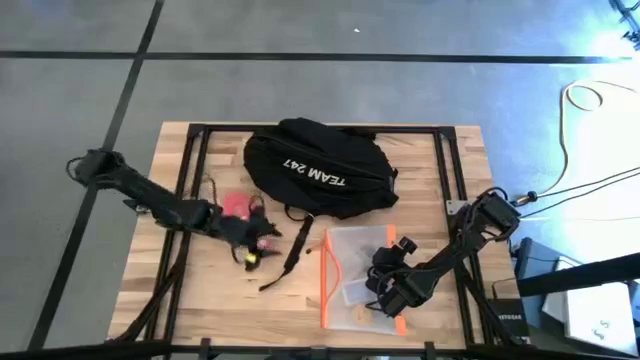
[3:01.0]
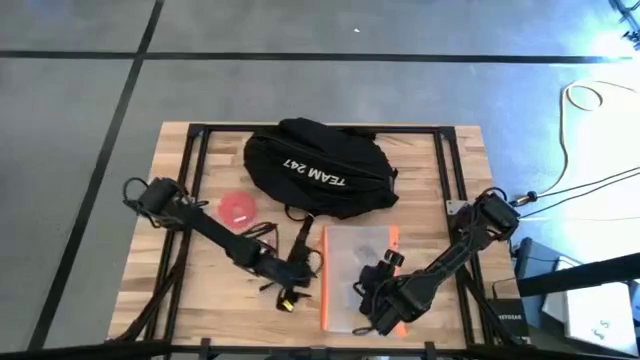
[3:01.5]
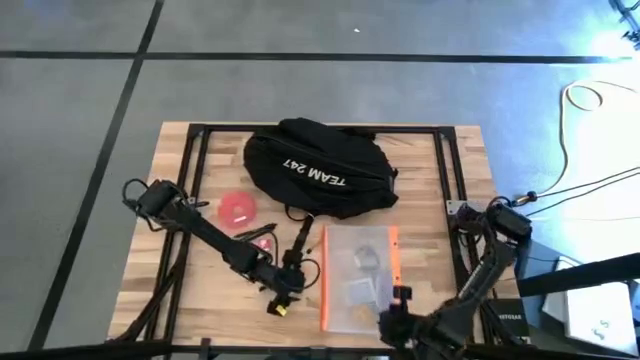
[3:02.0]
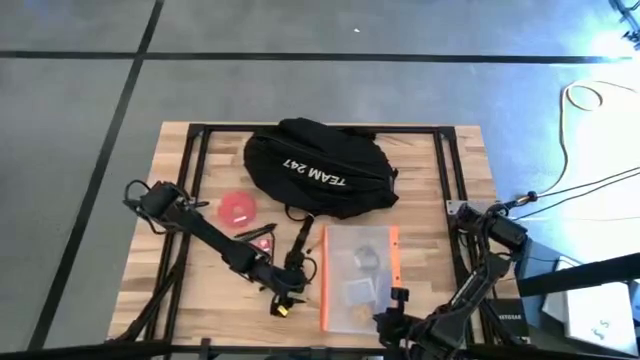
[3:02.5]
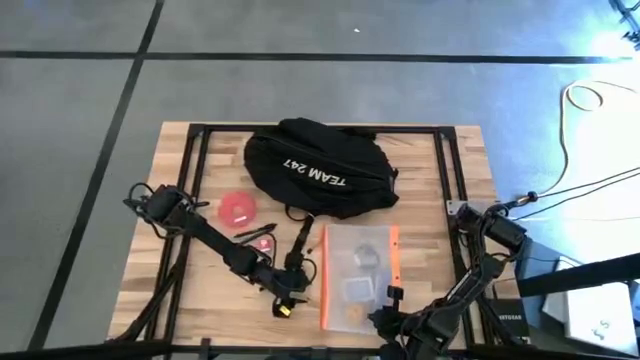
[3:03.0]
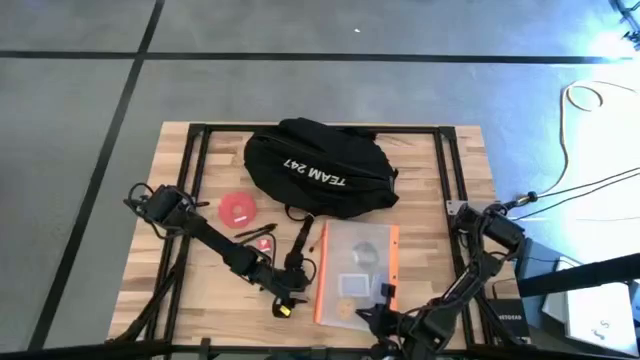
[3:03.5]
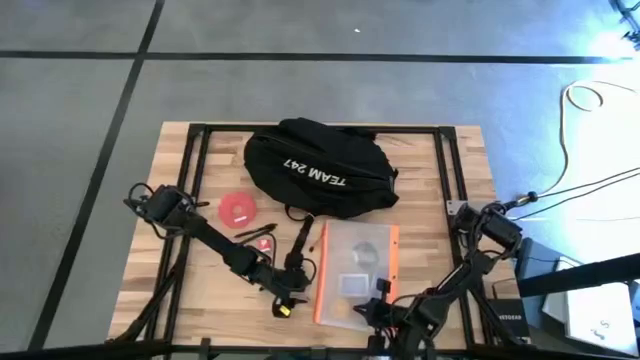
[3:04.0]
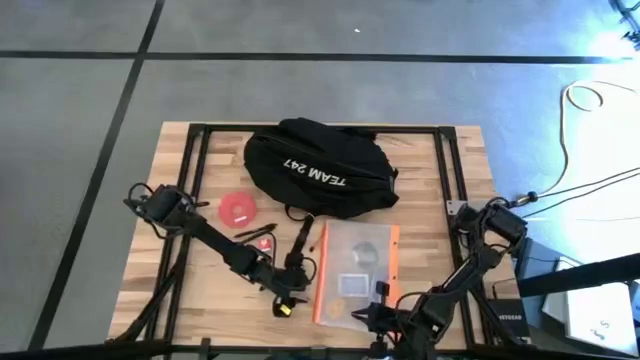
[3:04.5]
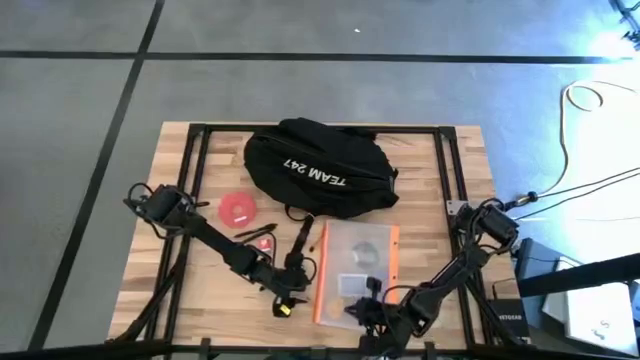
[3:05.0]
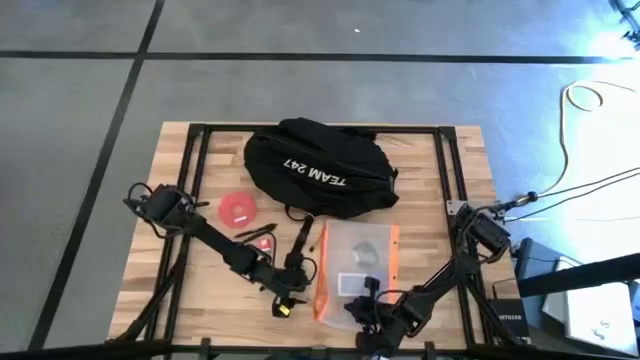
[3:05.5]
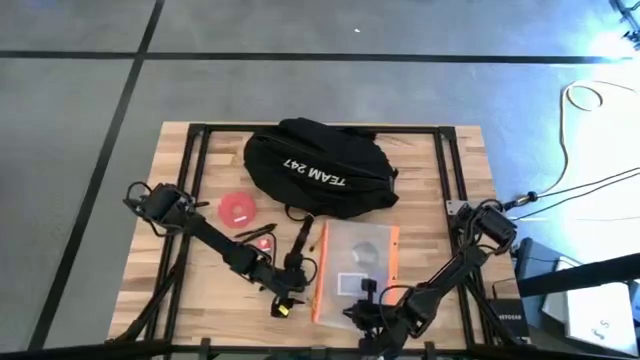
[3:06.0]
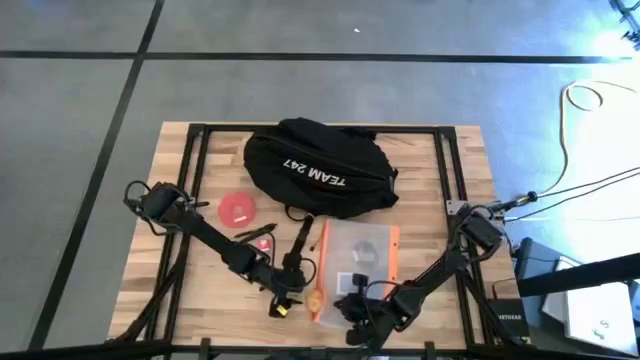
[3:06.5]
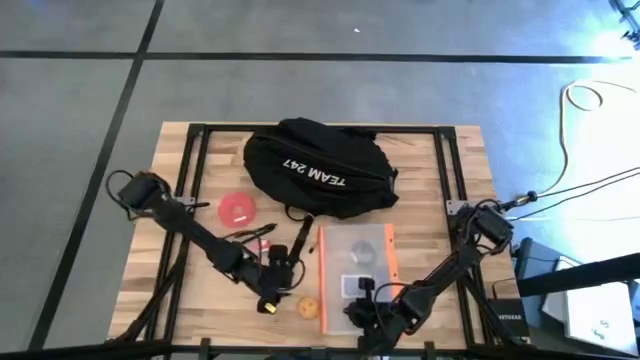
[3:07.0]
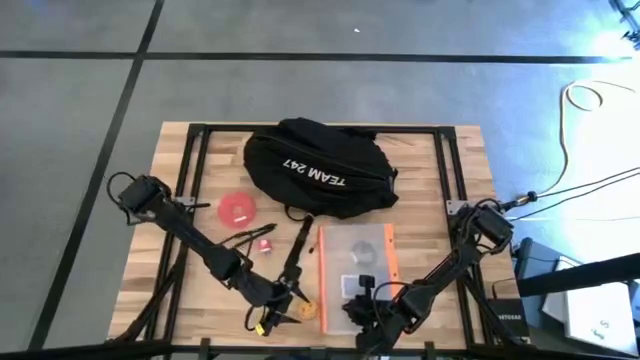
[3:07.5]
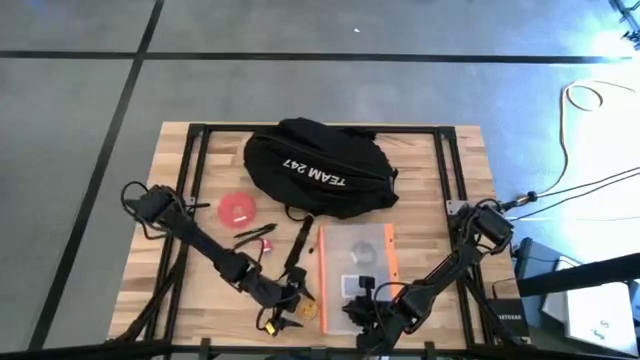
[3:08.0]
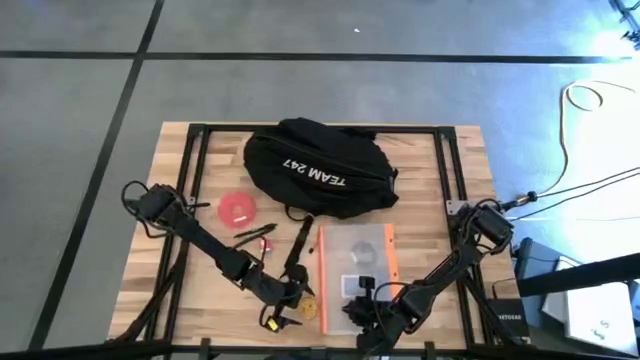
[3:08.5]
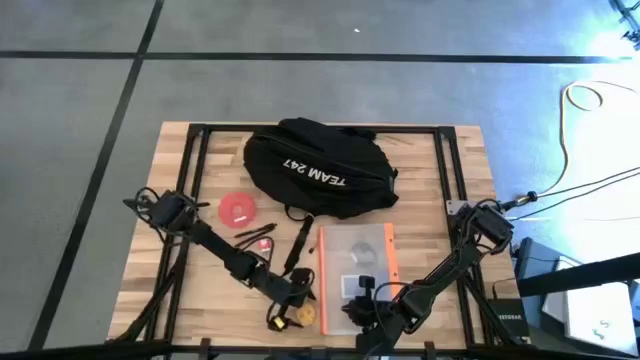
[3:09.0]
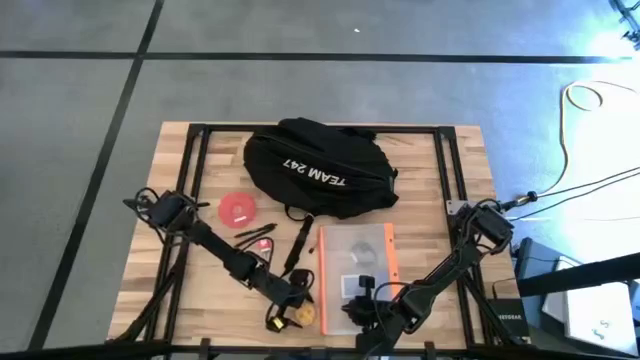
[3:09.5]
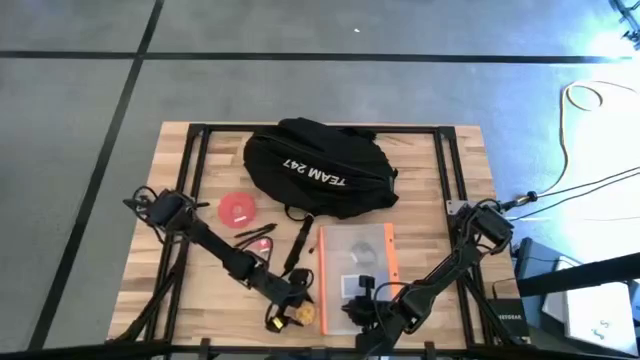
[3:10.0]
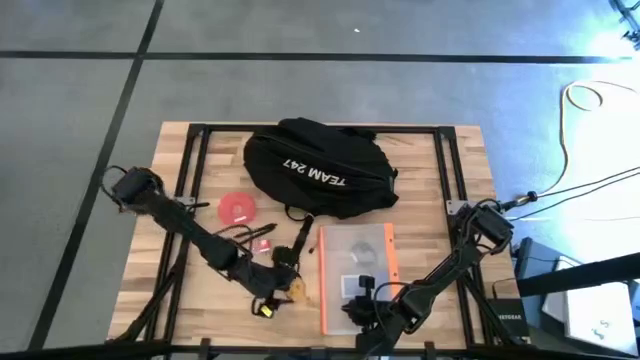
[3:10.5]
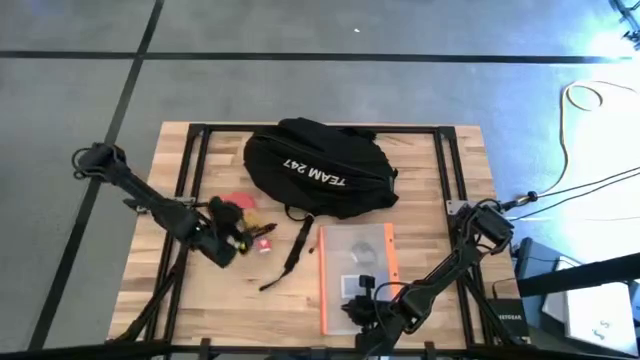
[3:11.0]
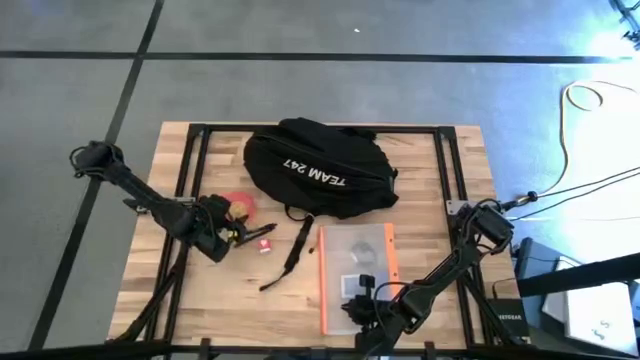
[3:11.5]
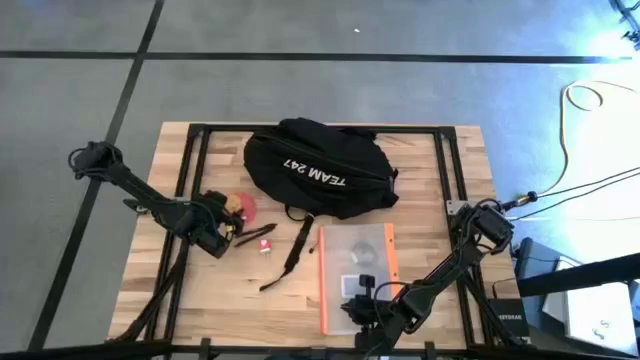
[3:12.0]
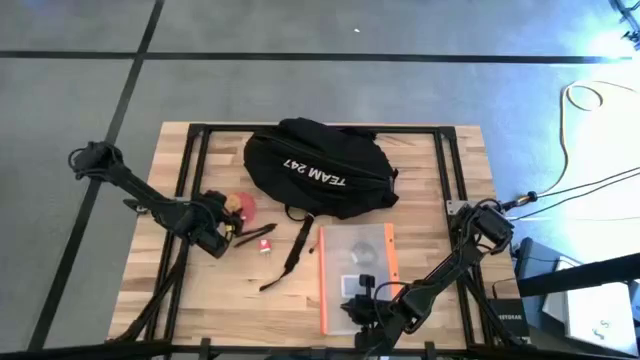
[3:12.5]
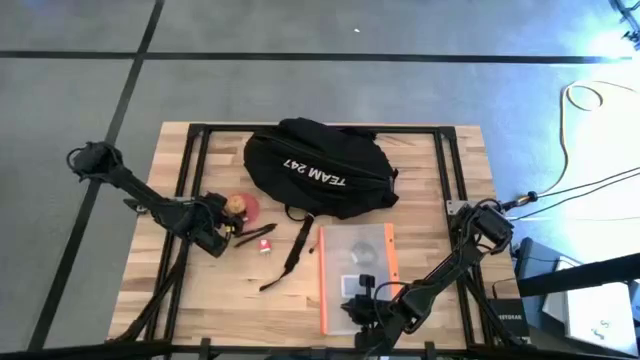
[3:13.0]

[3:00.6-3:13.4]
Task: Unpack backpack
Remove the yellow scented candle from the transparent white zip bag

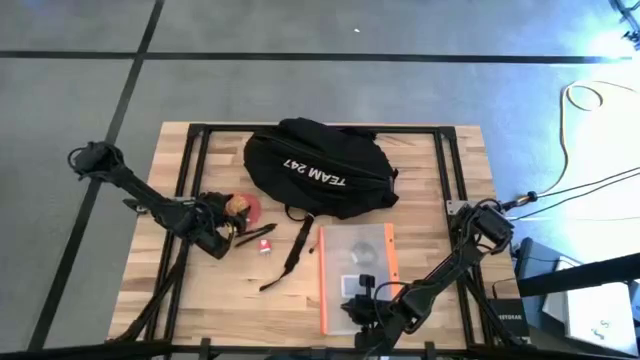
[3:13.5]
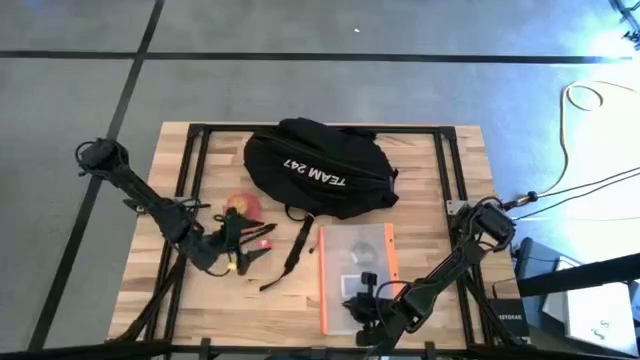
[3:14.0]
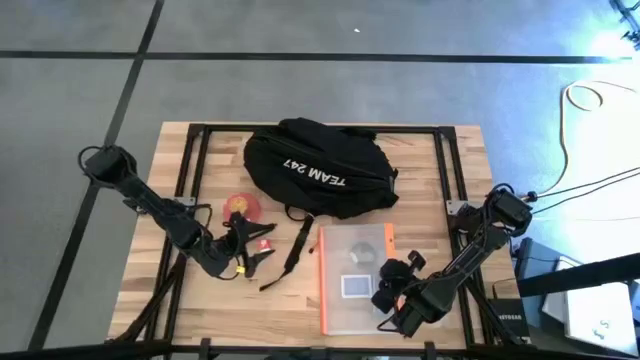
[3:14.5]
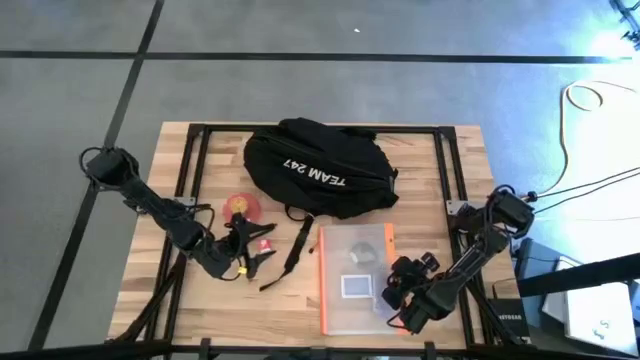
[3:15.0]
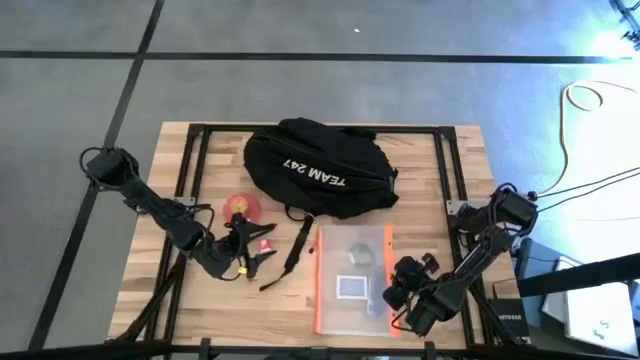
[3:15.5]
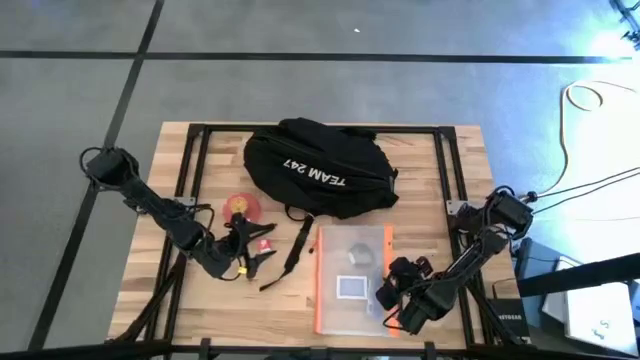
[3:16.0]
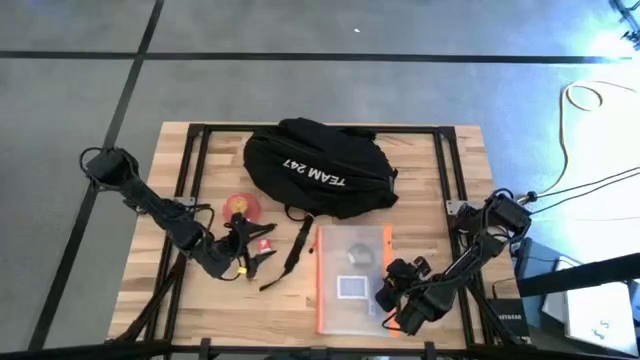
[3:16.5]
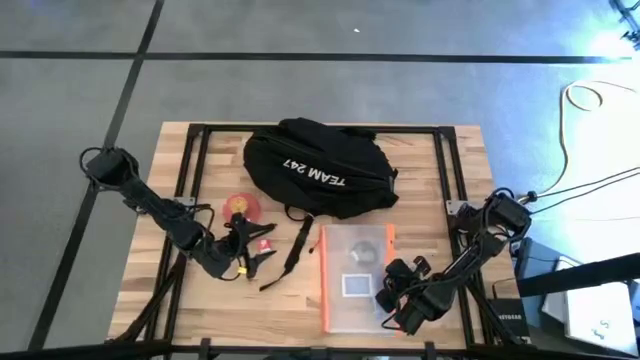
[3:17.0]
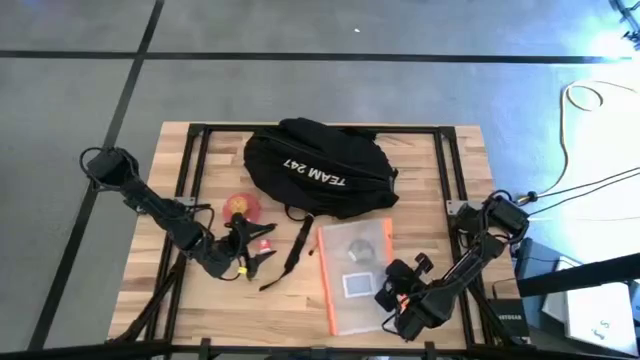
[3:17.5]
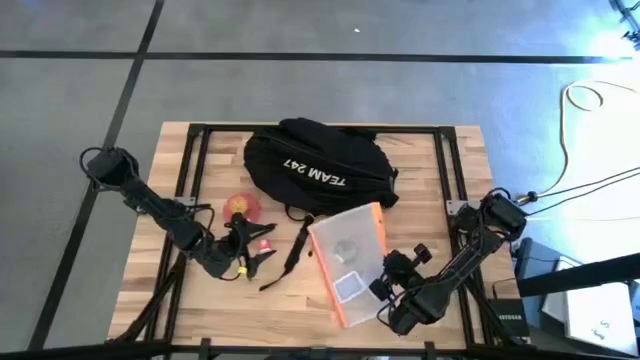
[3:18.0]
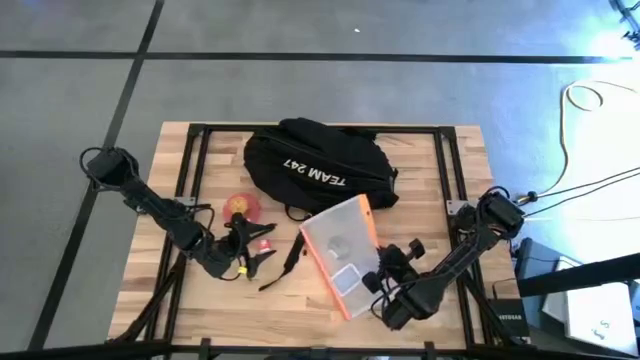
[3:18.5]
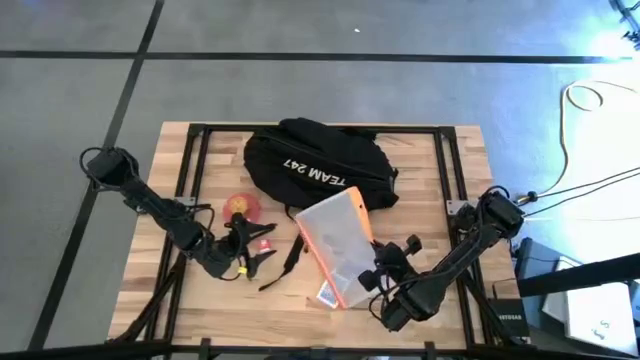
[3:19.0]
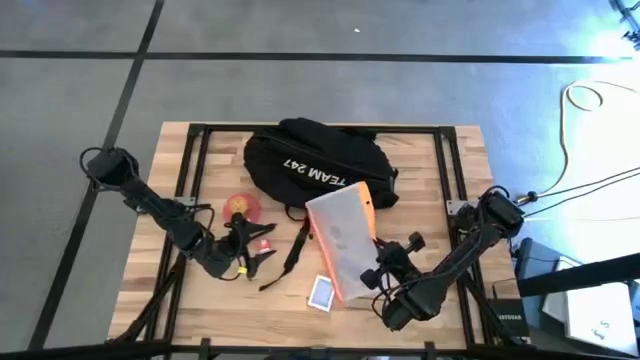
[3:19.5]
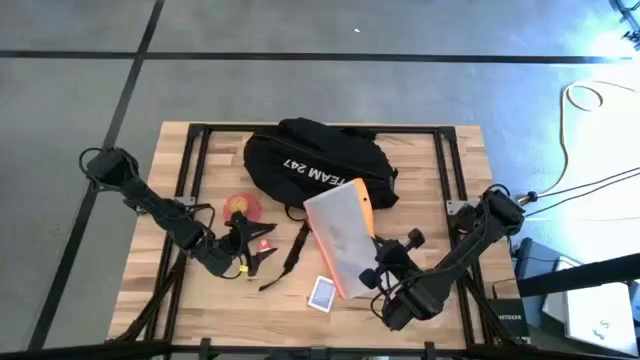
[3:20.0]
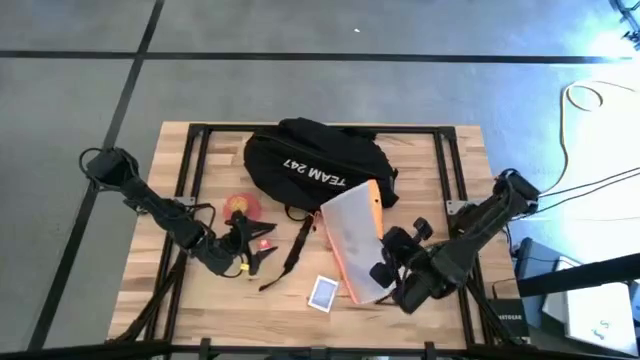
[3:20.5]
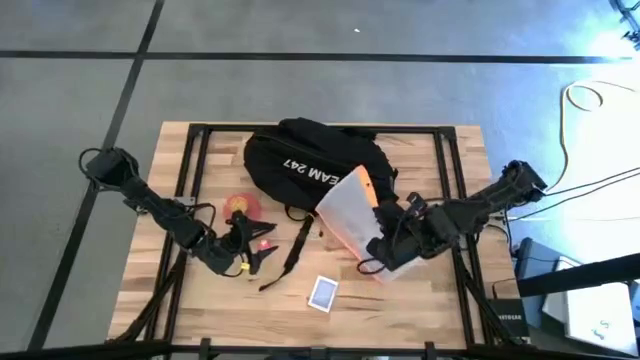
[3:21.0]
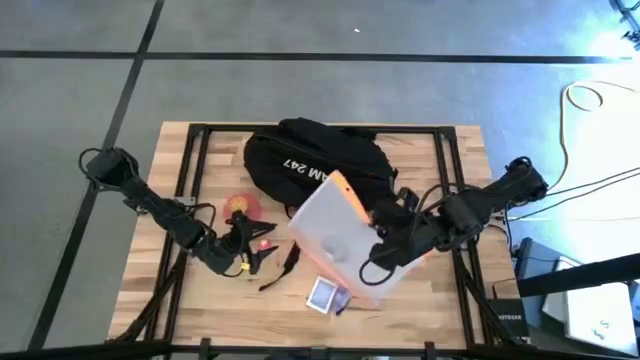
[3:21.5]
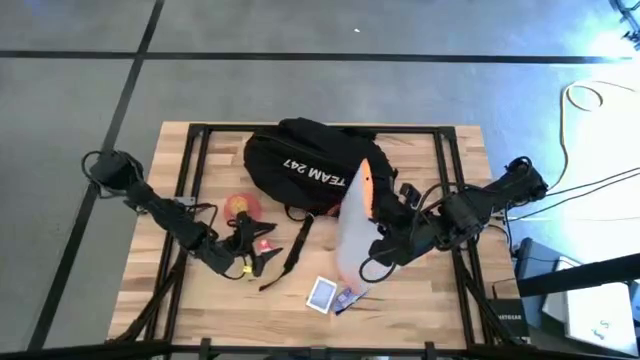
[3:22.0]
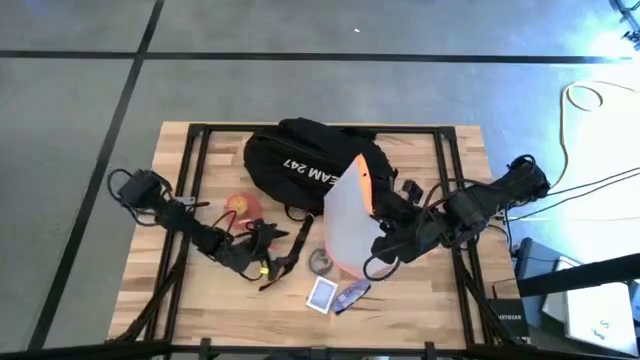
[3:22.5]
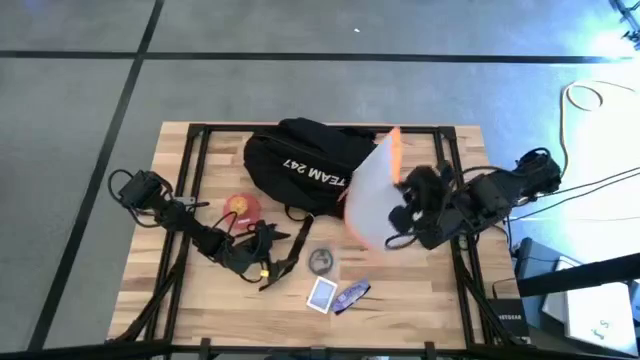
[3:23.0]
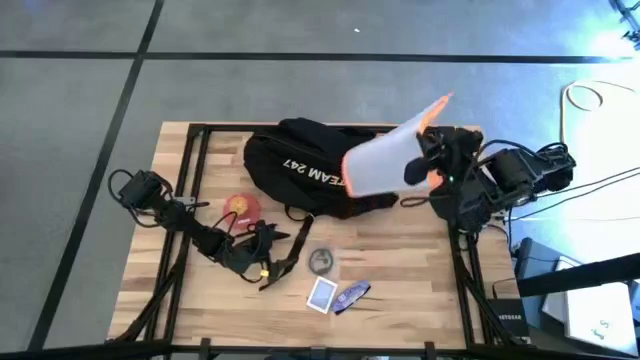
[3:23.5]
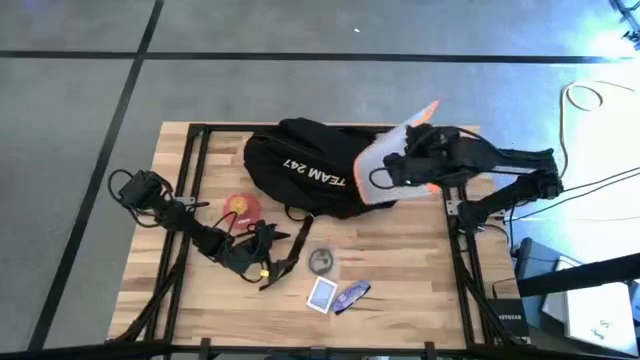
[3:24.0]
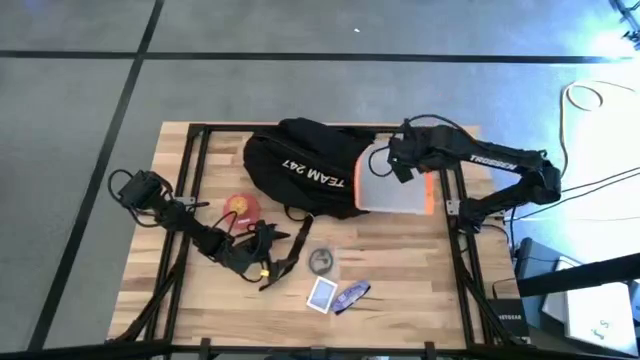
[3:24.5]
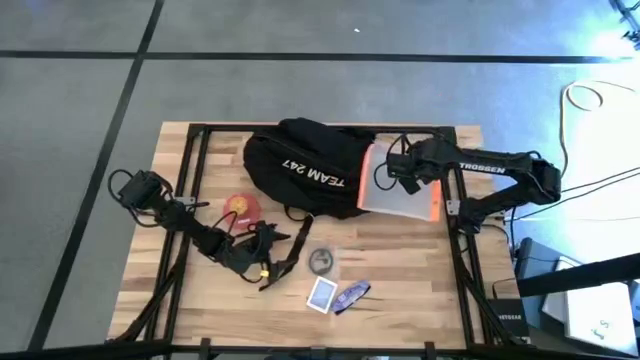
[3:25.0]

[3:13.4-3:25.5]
Remove the colored items from the transparent white zip bag
